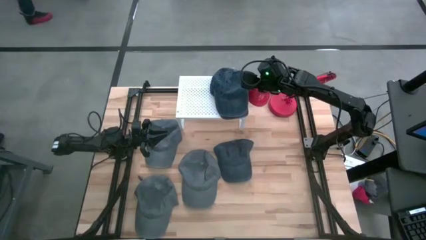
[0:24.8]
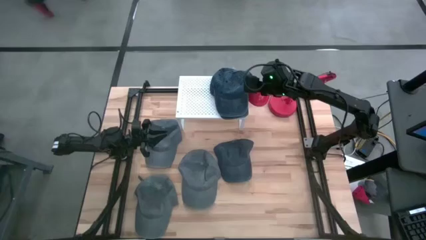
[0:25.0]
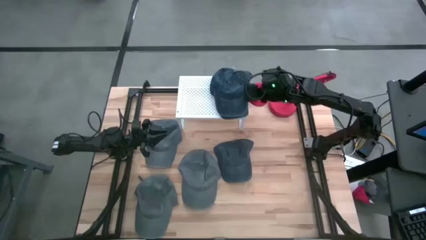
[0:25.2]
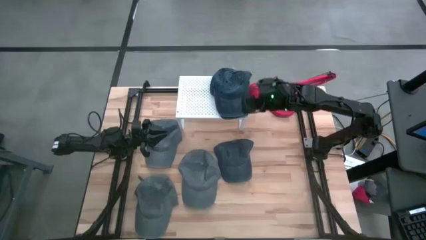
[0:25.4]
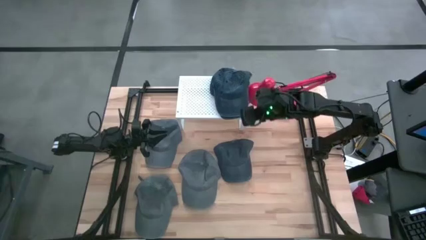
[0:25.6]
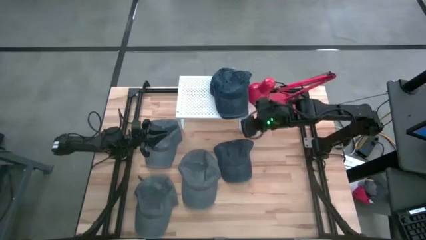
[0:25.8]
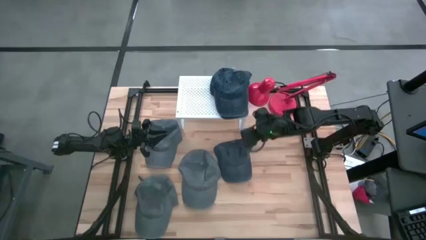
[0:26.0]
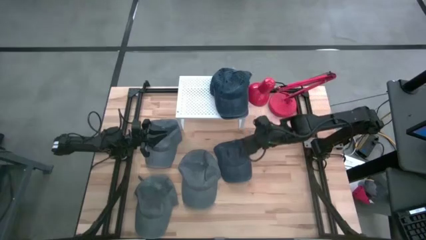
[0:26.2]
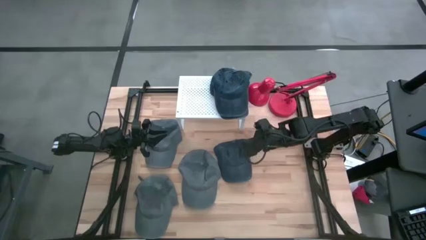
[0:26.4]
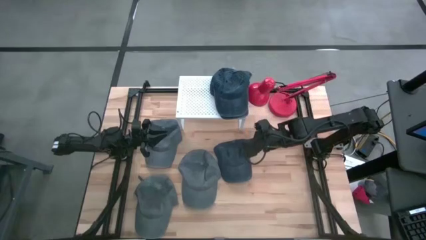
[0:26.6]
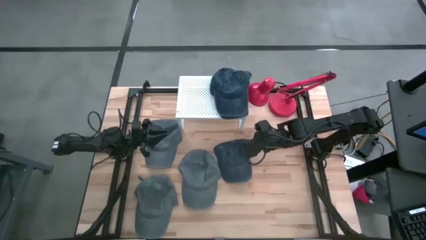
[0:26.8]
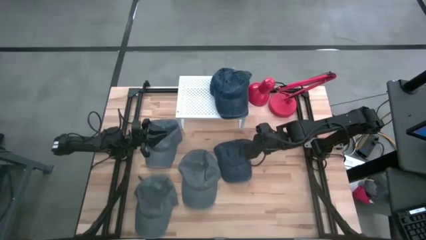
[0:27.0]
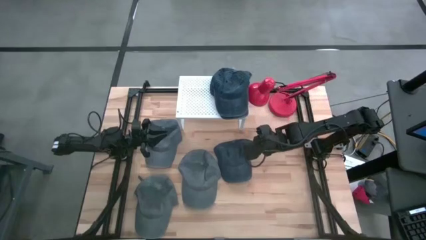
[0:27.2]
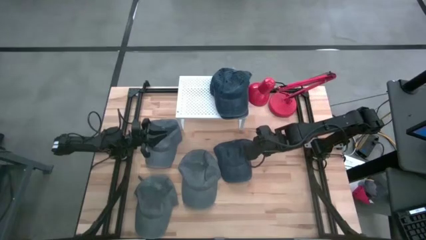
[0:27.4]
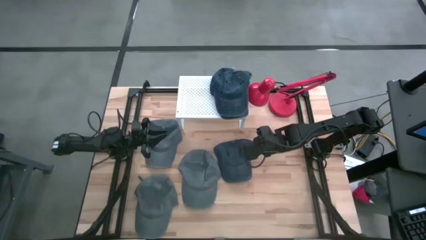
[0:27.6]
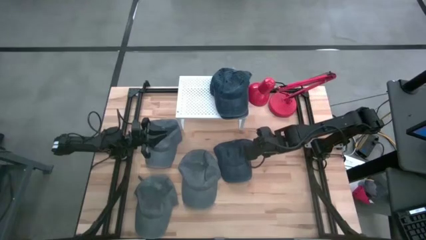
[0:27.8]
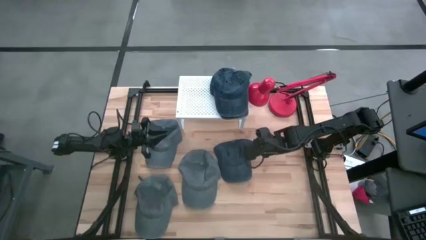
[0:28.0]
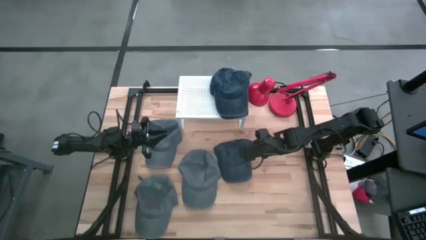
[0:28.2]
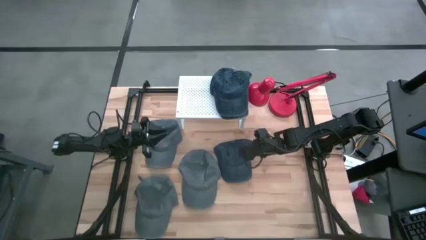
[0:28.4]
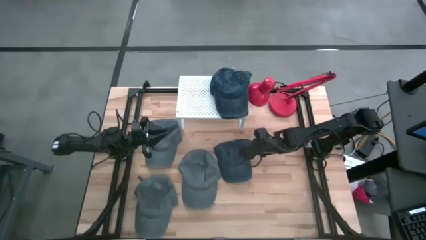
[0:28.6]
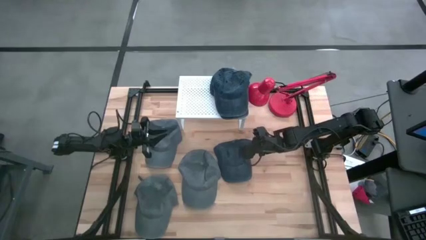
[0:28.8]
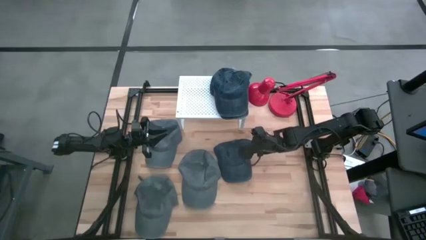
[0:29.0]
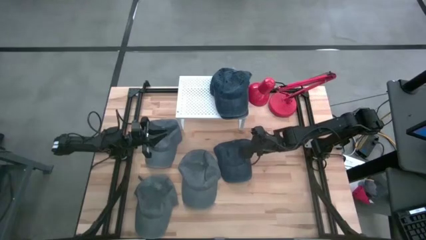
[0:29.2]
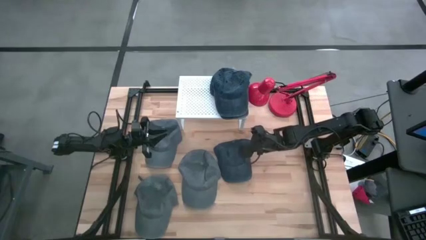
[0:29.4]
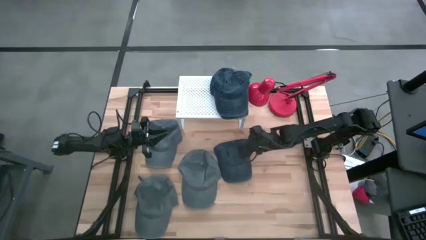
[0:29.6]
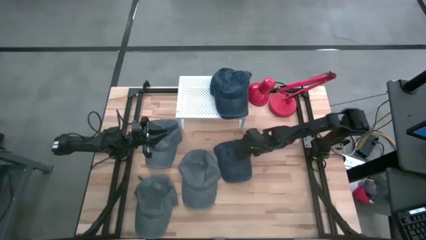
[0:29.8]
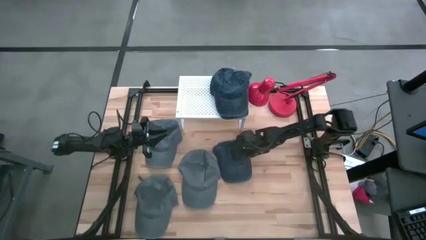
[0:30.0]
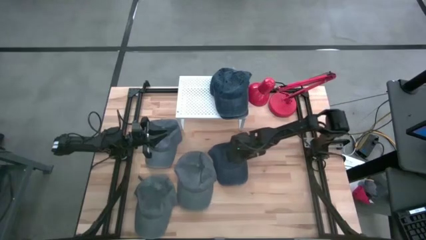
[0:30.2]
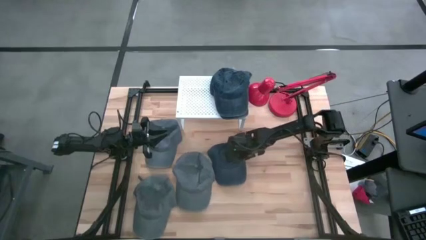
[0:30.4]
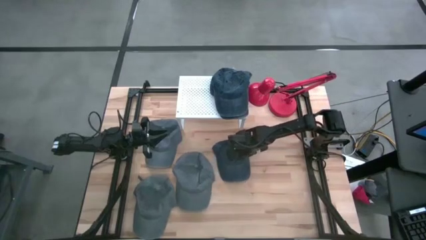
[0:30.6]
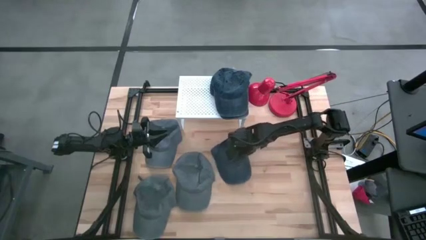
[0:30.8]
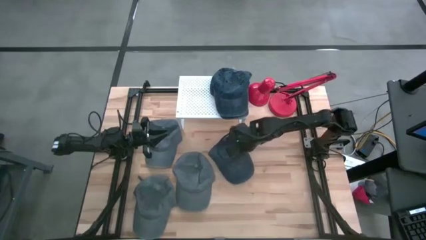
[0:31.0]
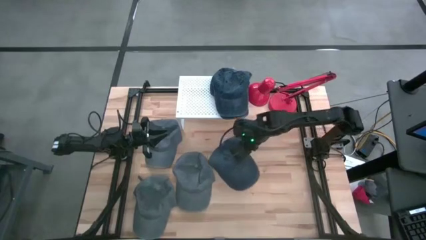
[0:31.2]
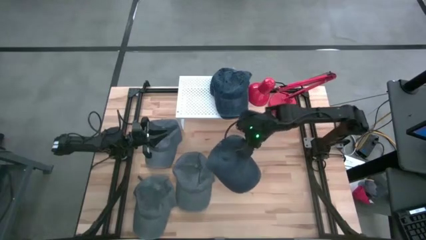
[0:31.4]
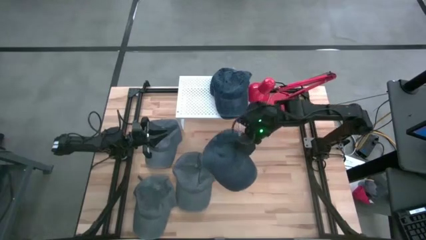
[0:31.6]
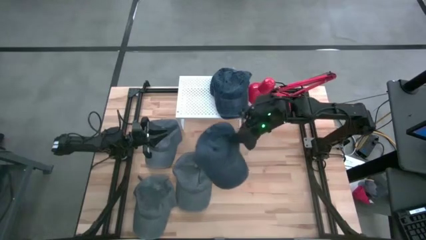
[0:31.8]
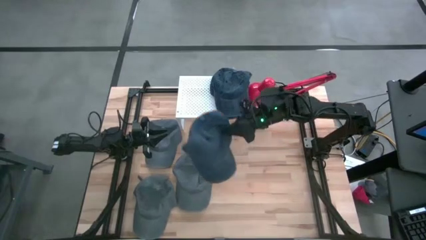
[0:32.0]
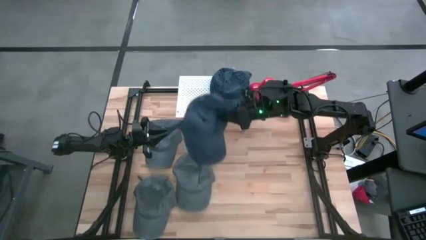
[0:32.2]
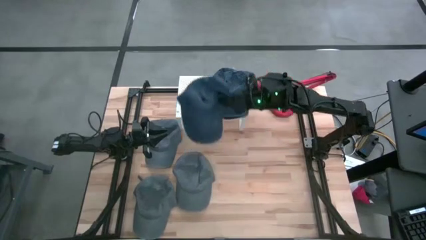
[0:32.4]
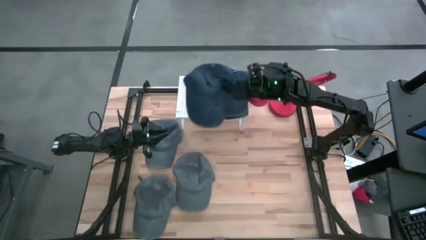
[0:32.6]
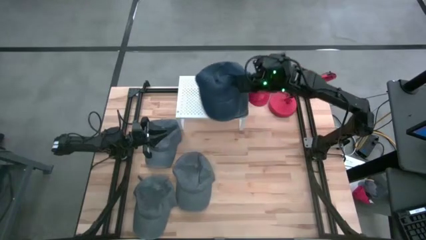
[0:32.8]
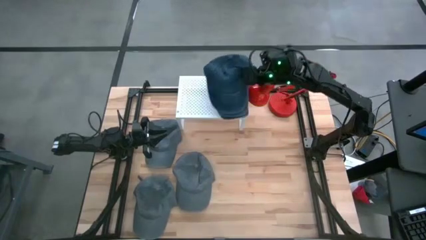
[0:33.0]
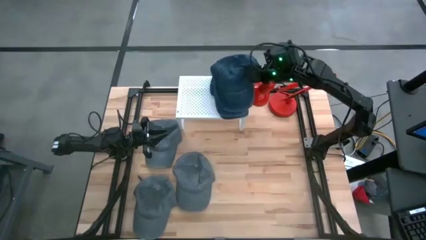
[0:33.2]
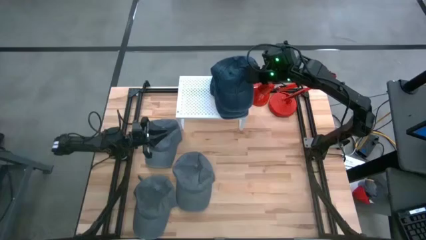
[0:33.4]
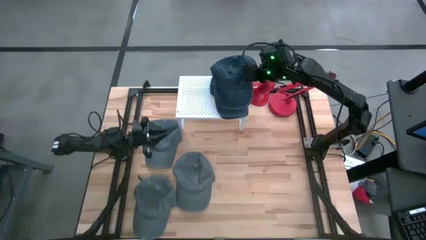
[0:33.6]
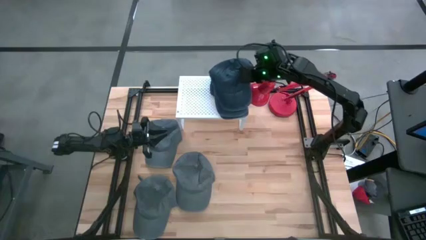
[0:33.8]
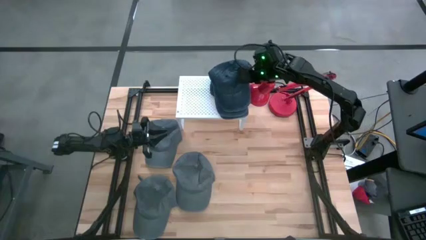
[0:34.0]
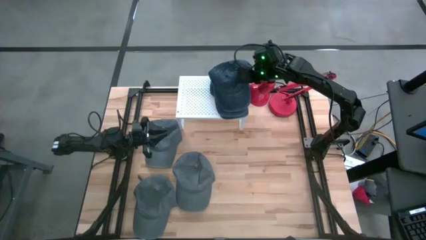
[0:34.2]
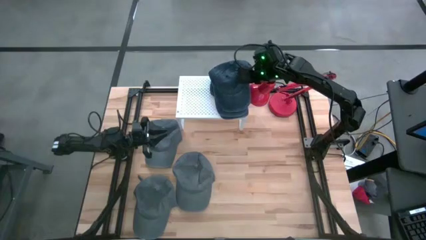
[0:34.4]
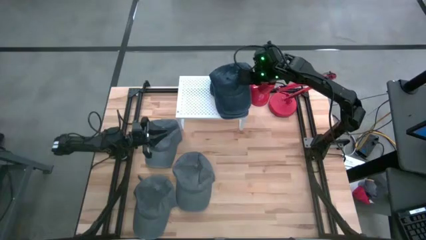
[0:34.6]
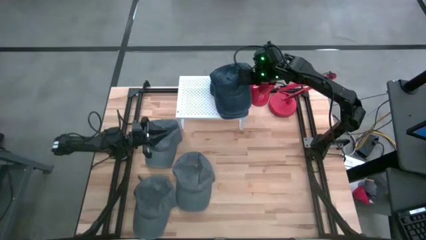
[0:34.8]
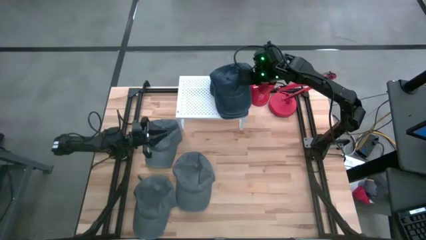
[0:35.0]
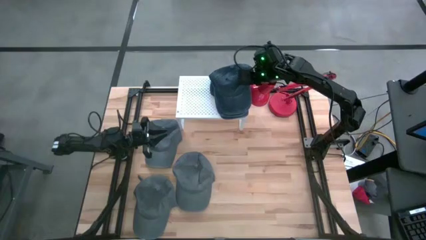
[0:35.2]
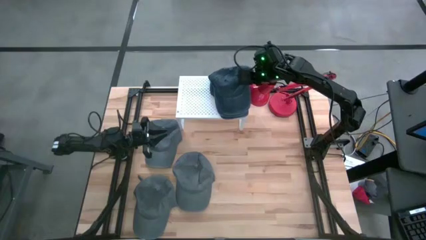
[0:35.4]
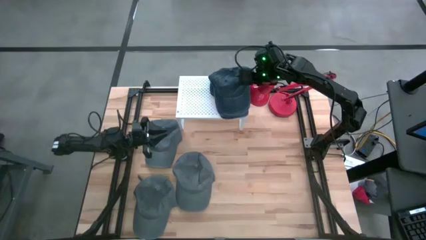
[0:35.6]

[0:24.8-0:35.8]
Task: Pick & Place hat
Stack the black cap on top of the black cap on the shelf

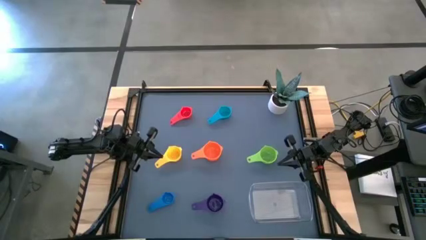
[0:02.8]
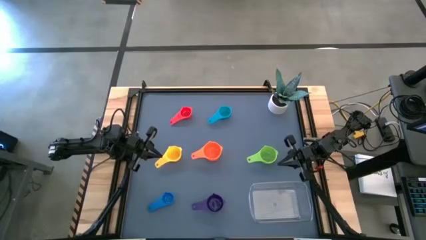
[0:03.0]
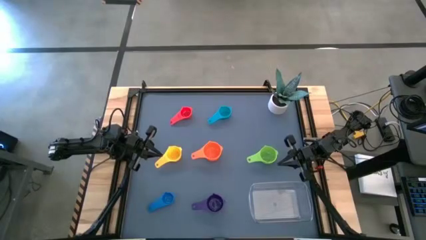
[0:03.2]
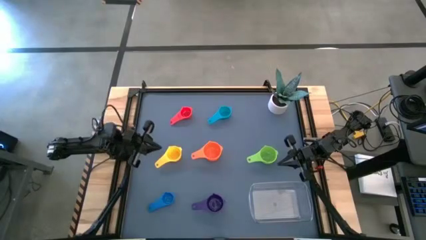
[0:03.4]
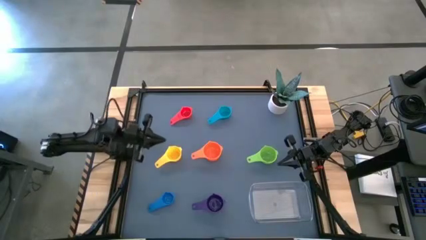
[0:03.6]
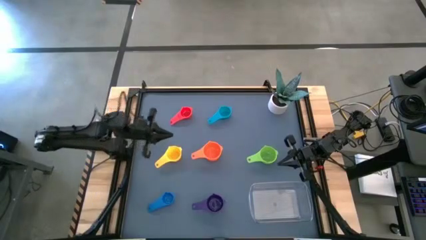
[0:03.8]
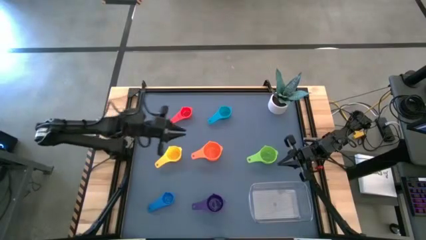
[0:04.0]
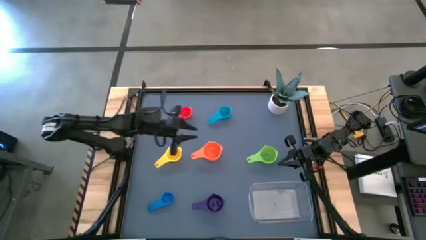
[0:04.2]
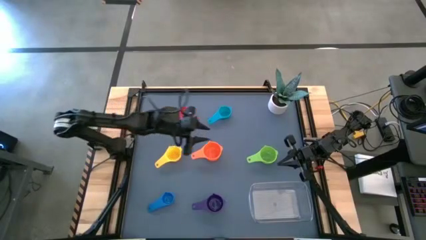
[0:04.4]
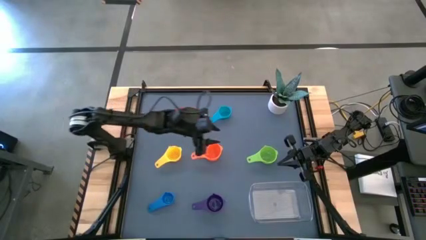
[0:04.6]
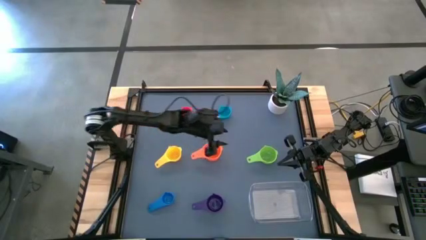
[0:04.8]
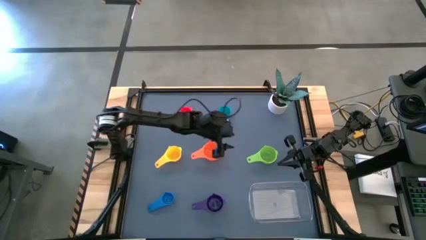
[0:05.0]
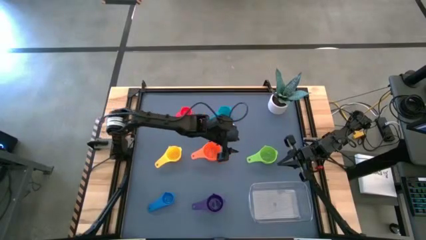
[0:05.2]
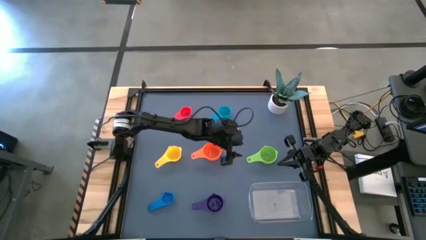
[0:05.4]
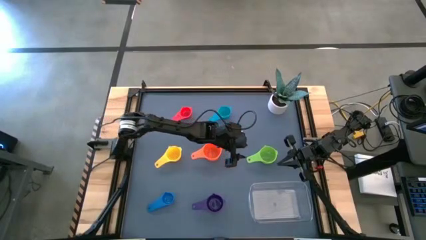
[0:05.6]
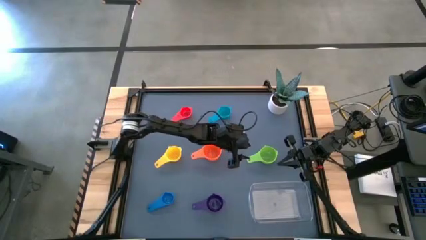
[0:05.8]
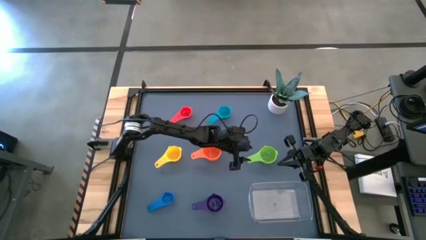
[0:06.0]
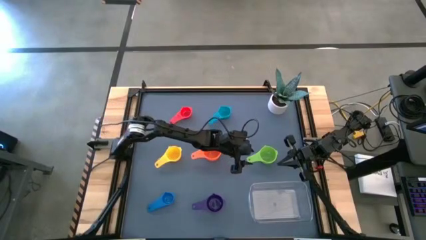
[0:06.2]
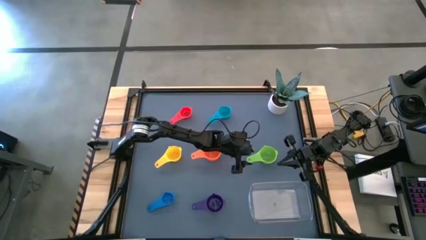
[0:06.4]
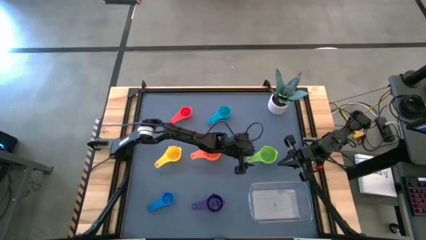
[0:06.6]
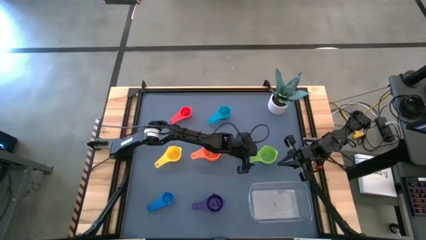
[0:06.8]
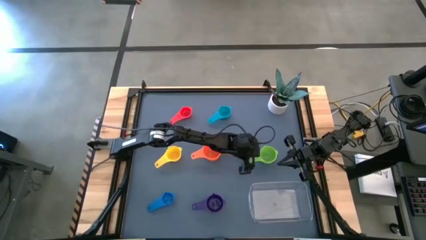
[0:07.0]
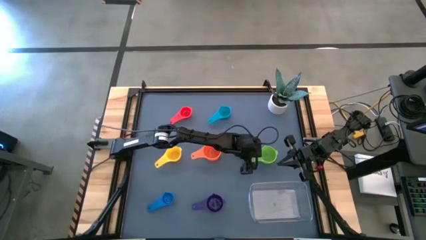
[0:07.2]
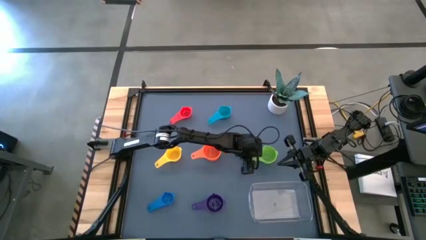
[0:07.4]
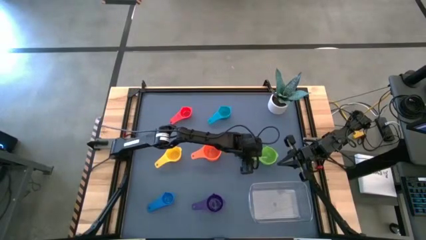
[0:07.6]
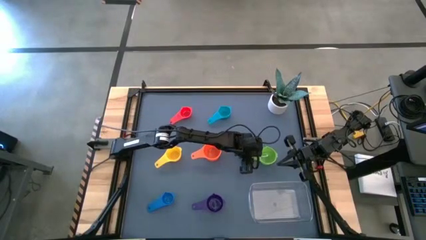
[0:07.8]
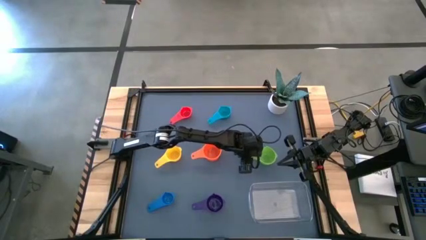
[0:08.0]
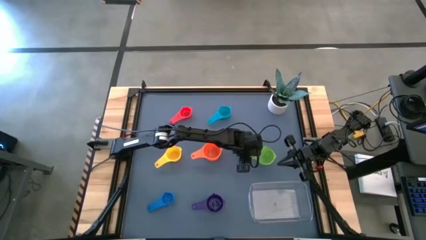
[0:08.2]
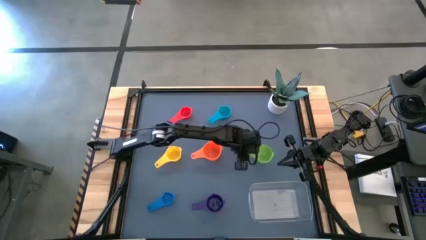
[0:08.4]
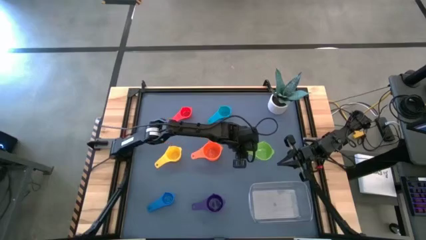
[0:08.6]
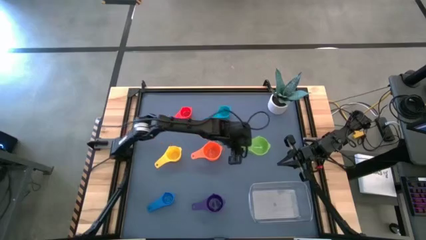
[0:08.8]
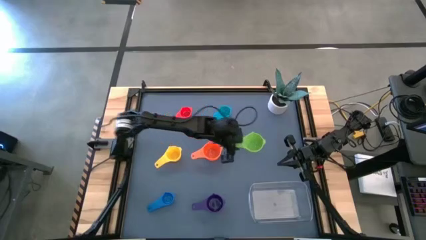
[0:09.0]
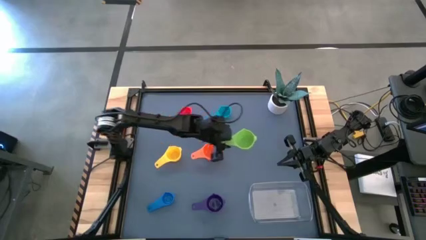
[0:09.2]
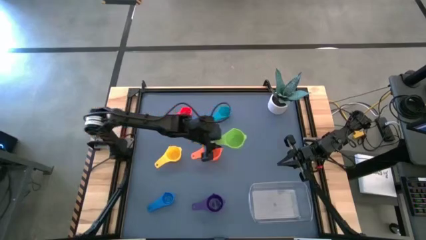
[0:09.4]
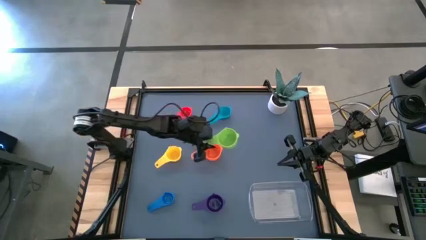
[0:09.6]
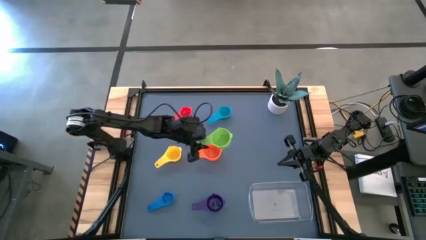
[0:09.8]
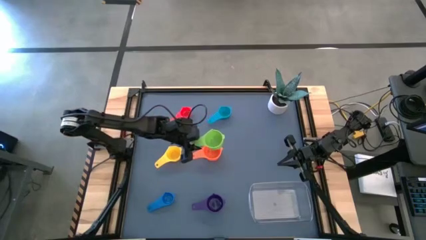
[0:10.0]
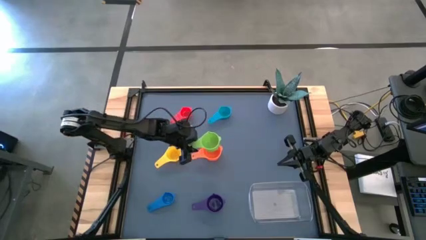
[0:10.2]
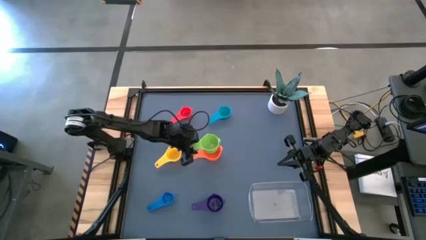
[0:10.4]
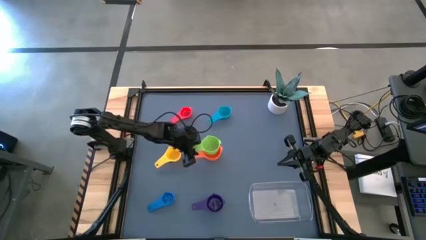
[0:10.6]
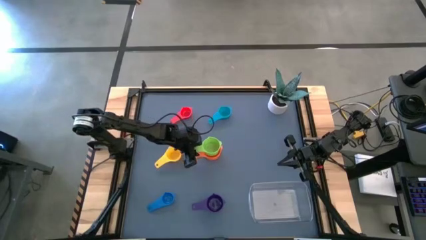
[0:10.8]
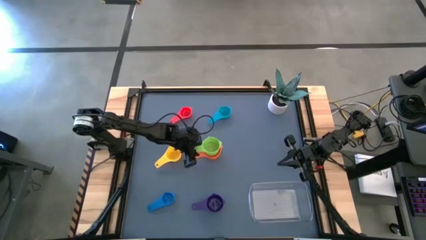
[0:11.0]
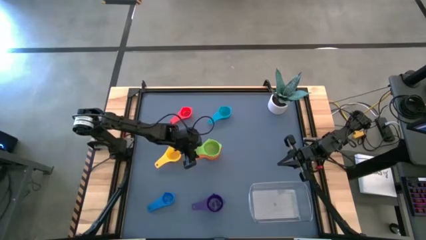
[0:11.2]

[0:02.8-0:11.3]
Task: Nest measuring cups in basket
Stack the light green measuring cup on top of the orange measuring cup
